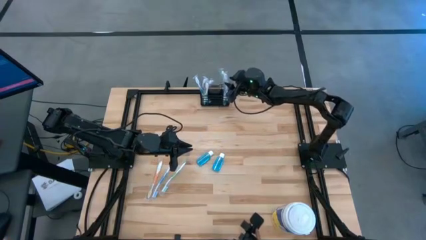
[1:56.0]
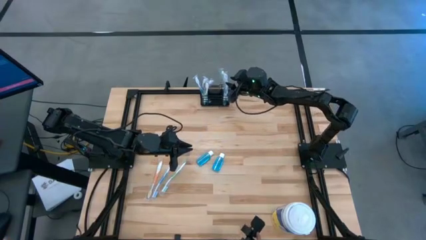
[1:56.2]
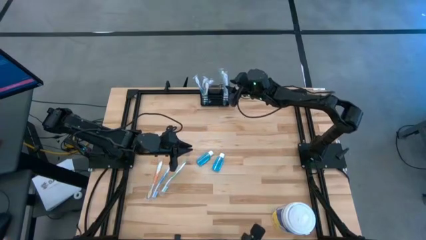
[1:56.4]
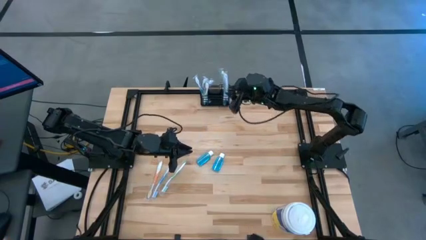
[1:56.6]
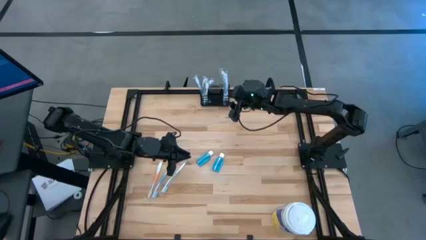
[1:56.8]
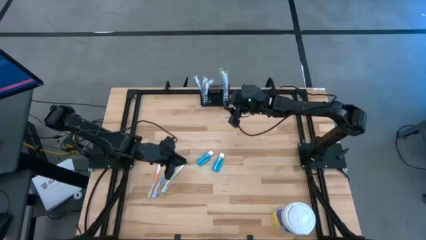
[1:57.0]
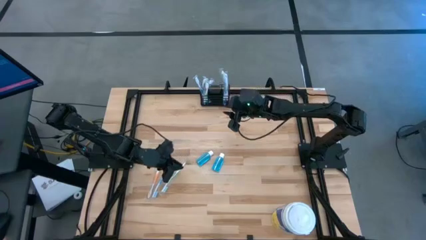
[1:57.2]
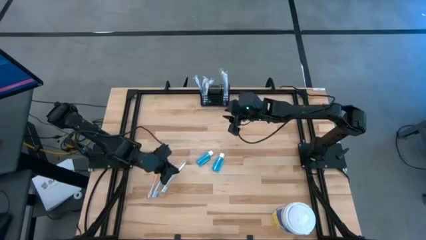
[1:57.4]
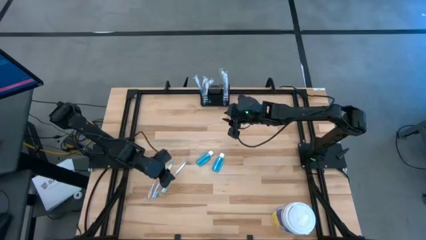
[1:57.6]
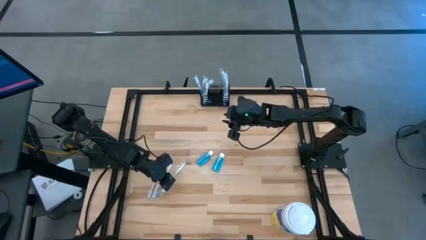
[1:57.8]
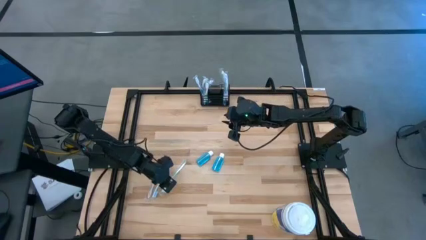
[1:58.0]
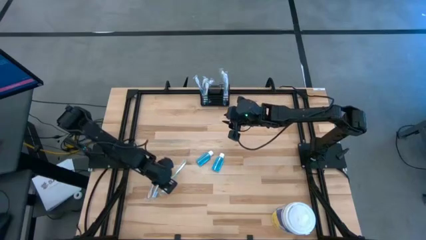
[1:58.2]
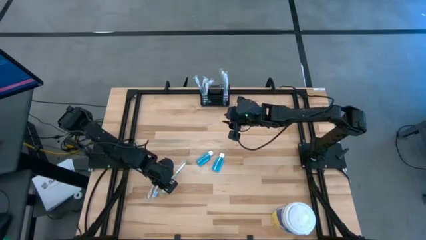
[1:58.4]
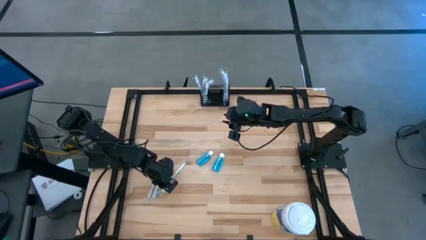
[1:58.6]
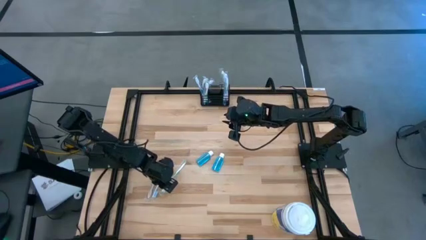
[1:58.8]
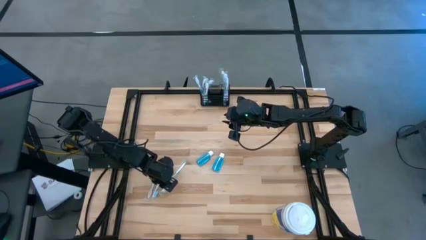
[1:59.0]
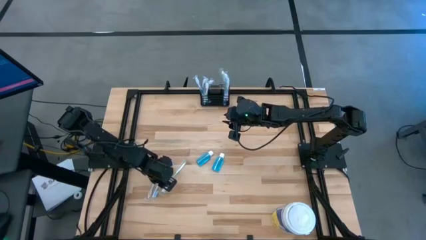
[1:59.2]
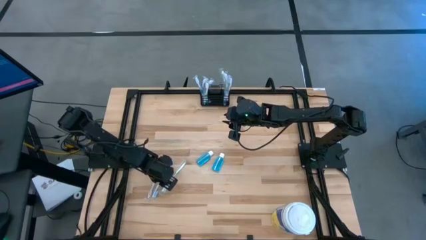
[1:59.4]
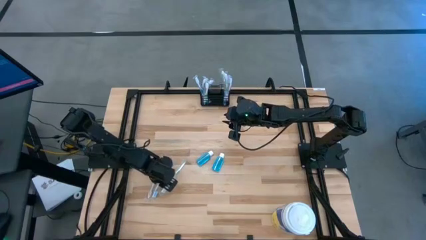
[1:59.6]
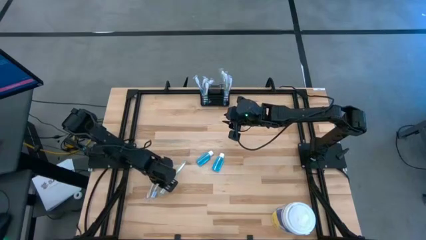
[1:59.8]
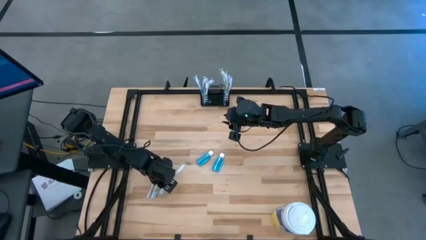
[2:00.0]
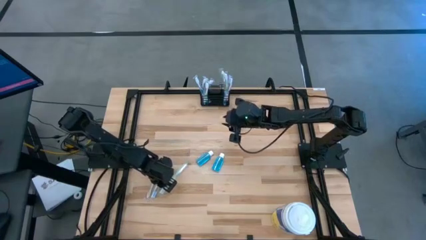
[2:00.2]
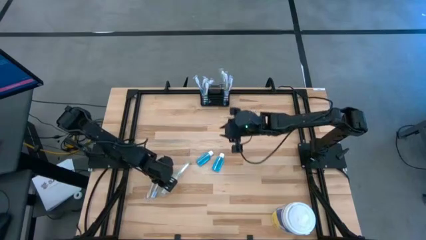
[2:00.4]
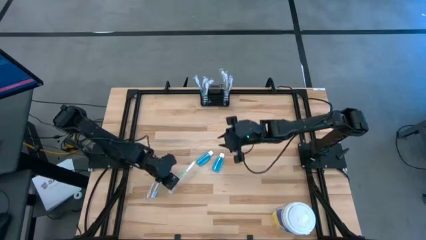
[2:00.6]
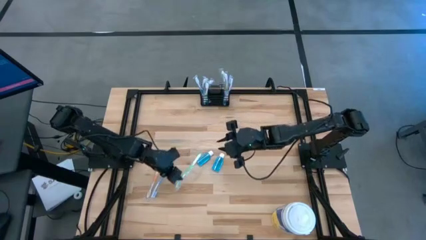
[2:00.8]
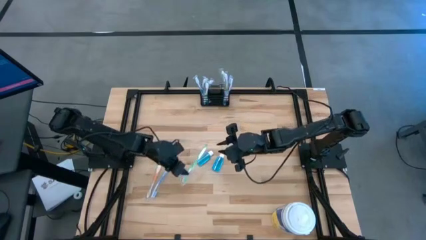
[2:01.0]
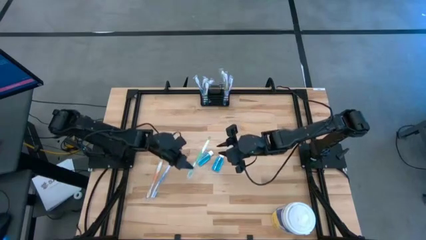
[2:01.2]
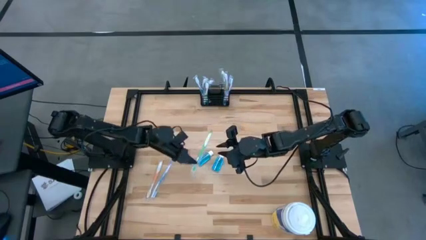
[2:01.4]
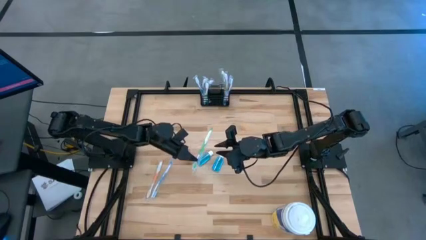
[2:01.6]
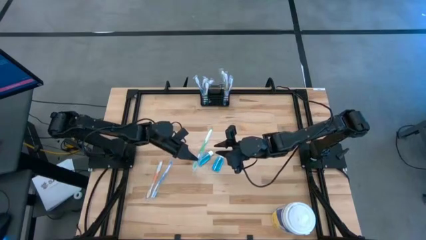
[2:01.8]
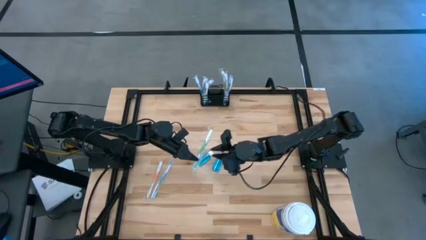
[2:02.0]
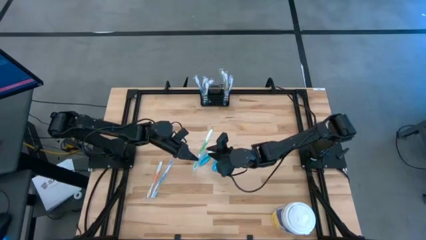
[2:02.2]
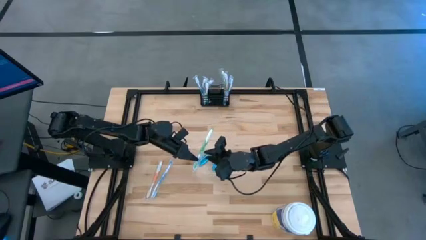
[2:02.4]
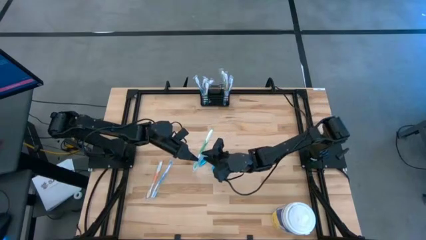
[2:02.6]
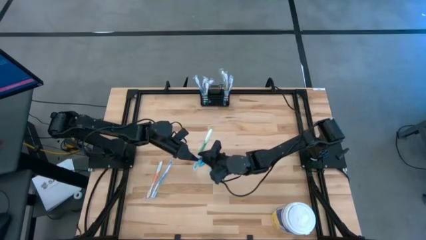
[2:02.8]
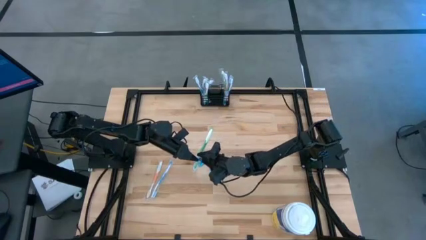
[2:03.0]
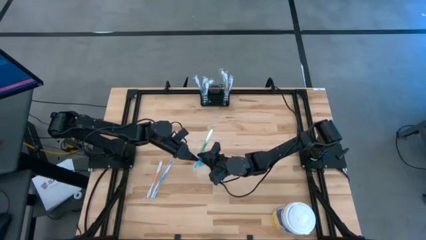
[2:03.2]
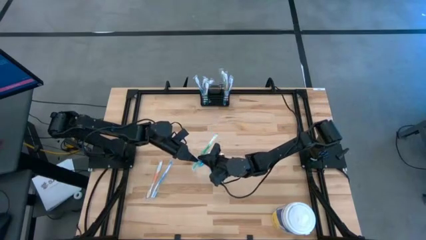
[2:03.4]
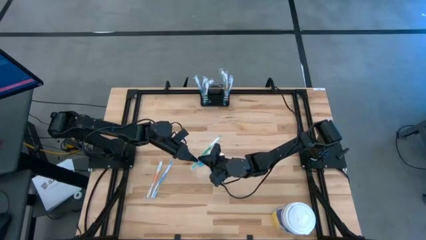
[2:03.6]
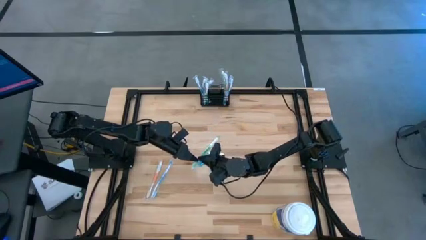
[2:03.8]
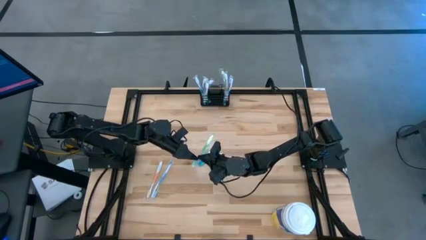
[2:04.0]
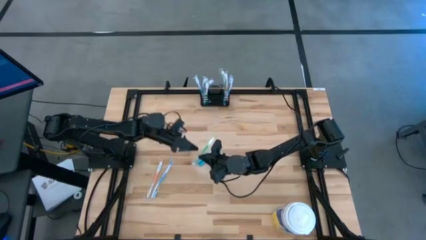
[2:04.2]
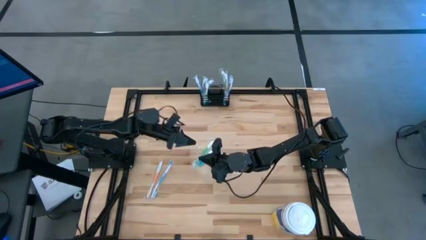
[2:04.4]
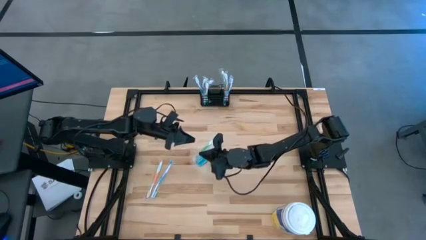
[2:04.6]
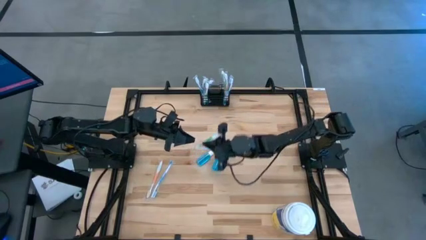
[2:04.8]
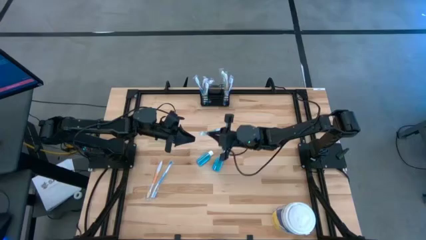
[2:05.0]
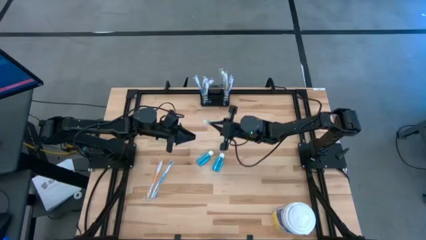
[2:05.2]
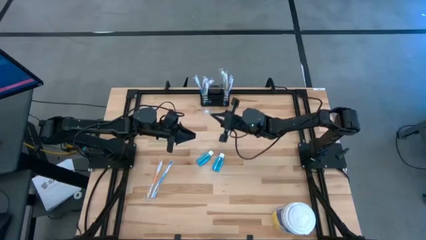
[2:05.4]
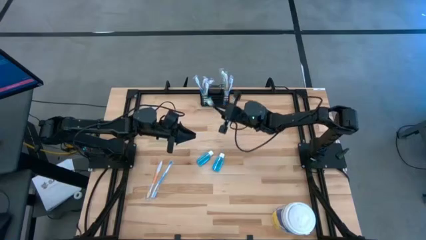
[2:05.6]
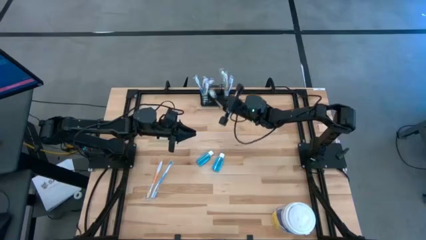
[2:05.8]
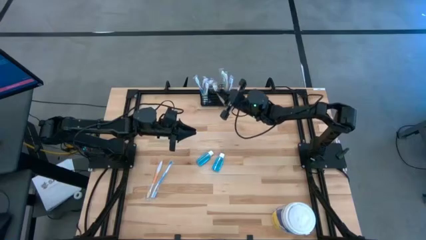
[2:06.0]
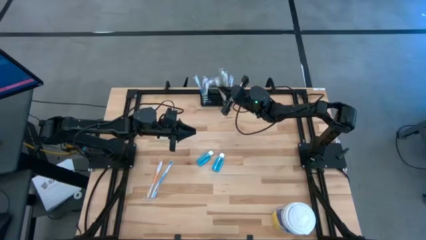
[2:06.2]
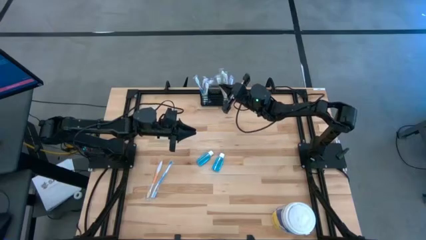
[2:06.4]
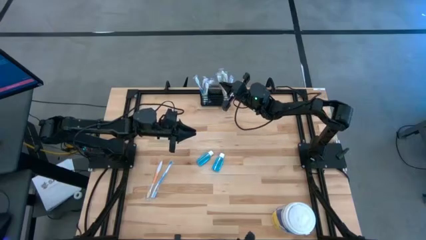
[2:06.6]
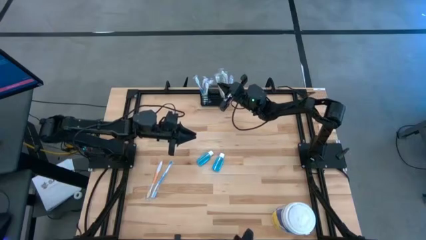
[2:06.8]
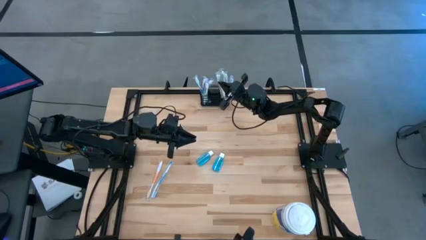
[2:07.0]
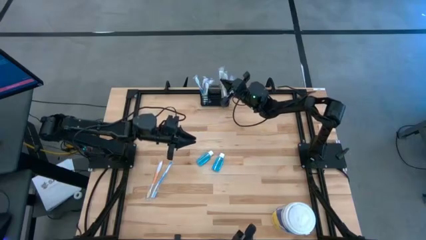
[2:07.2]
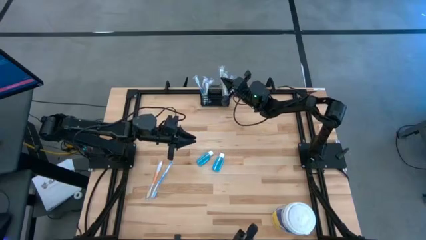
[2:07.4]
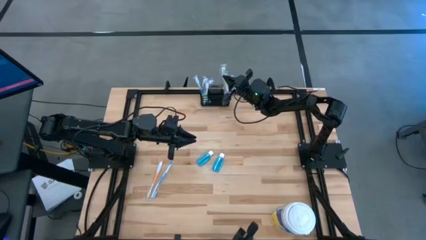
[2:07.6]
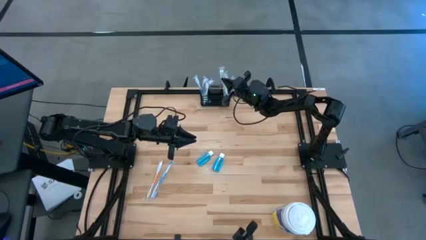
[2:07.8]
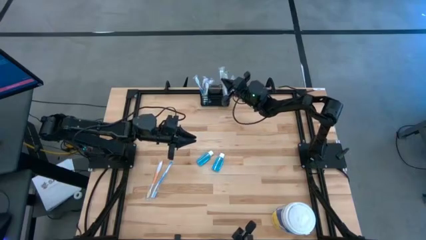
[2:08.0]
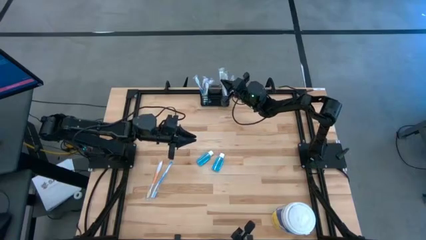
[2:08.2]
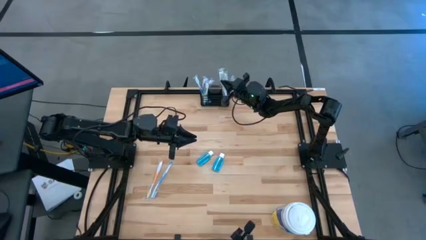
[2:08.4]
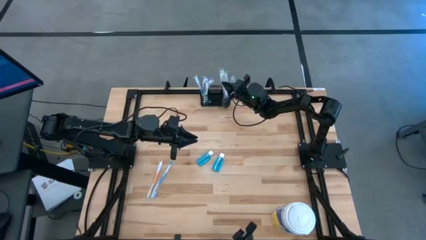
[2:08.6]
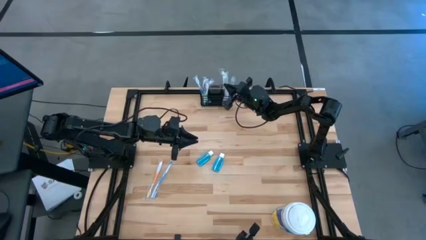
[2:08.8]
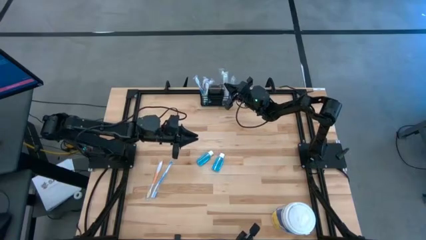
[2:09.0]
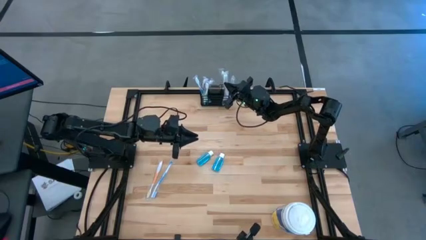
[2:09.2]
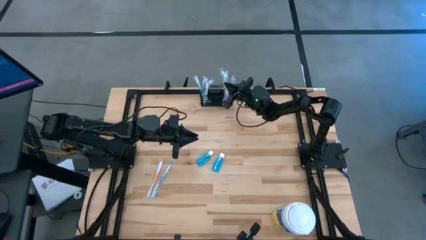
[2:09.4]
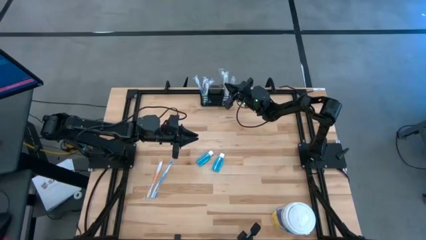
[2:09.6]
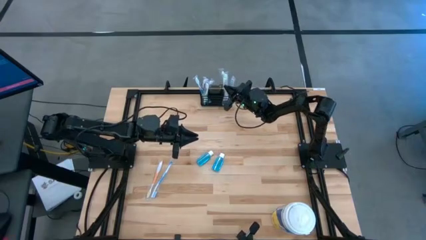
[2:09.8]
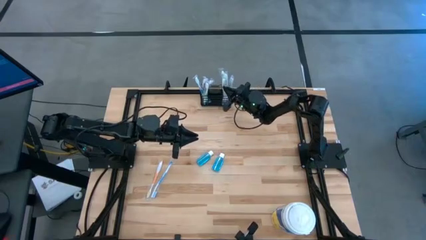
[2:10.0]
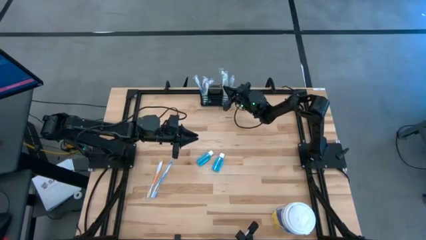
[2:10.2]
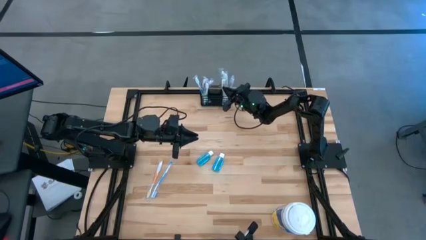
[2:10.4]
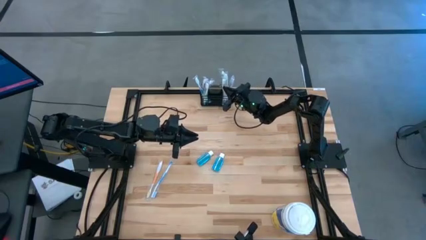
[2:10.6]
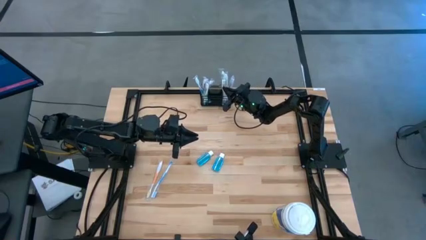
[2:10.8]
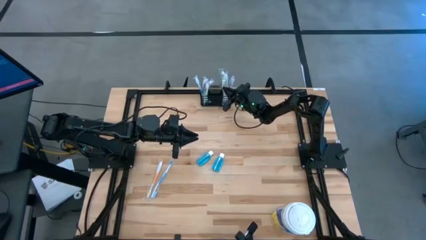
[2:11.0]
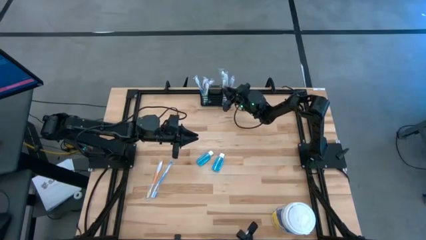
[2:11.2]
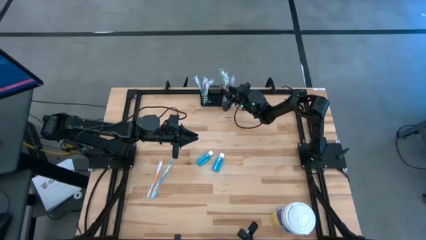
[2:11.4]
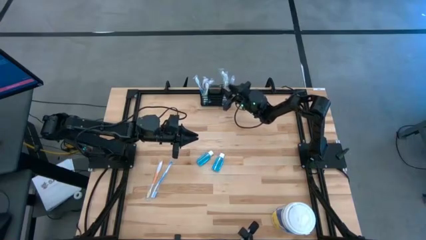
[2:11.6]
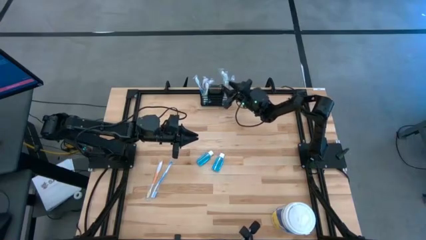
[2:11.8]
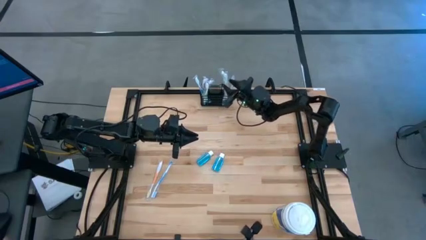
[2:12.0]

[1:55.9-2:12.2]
Task: Pick & Place toothbrushing station
Put the green toothbrush into the black wire organizer
